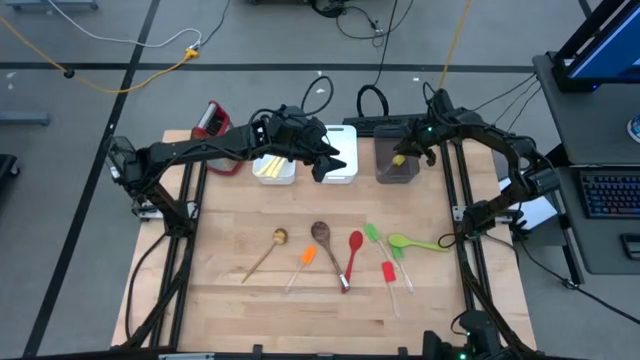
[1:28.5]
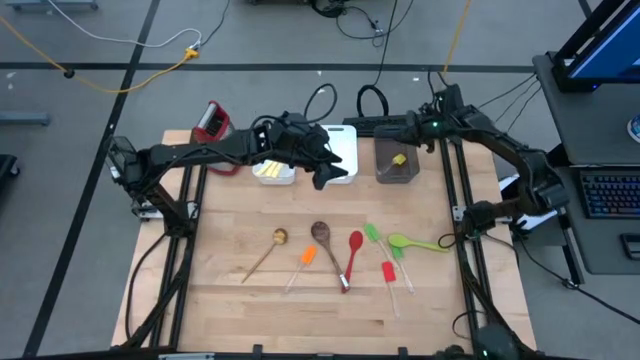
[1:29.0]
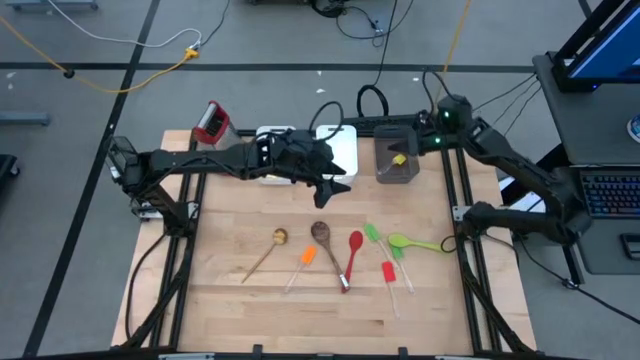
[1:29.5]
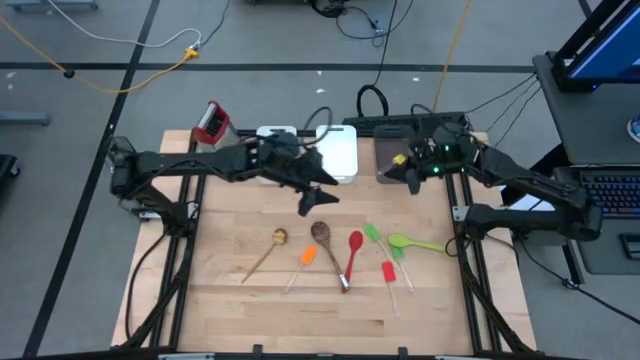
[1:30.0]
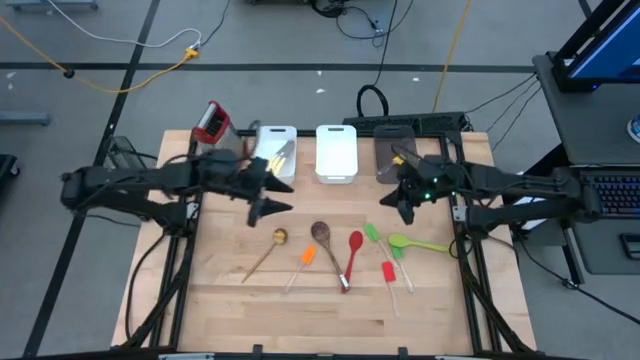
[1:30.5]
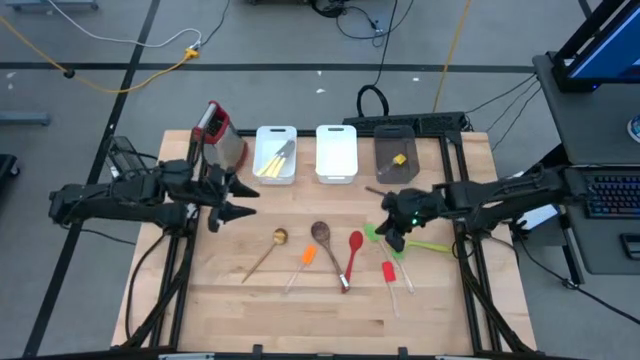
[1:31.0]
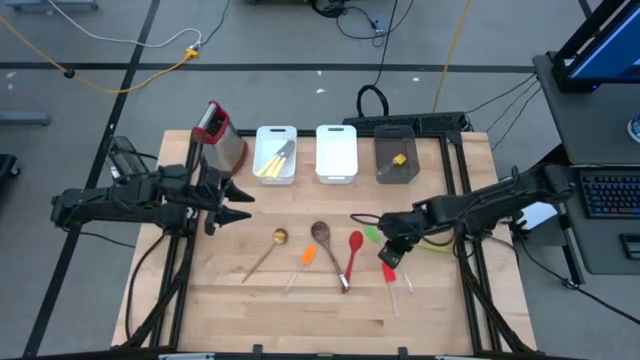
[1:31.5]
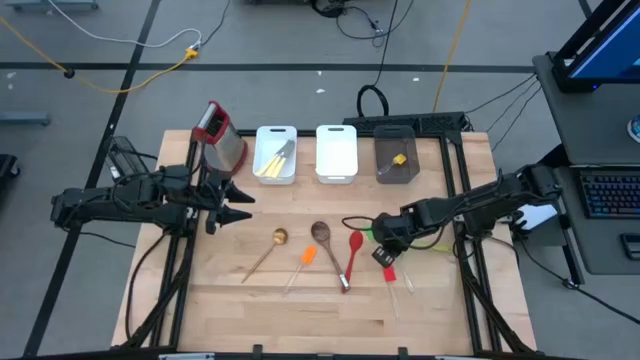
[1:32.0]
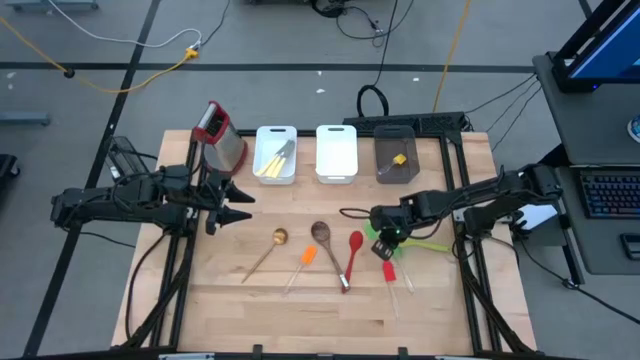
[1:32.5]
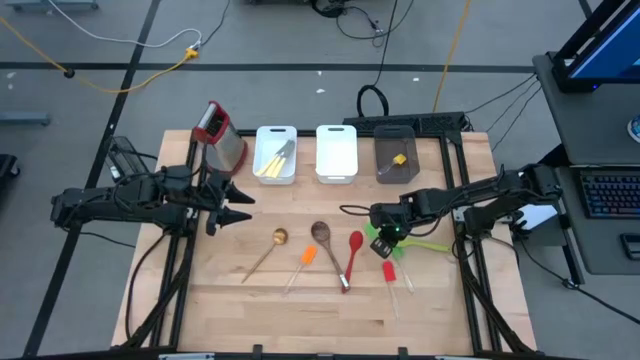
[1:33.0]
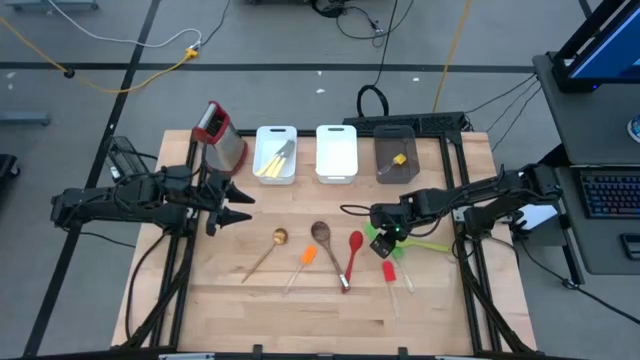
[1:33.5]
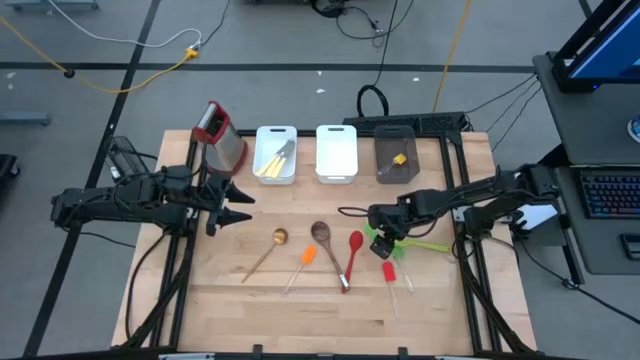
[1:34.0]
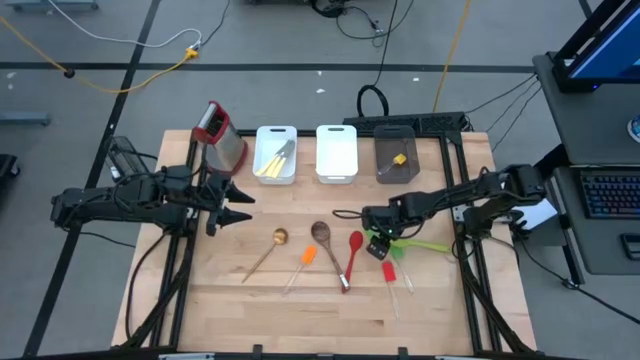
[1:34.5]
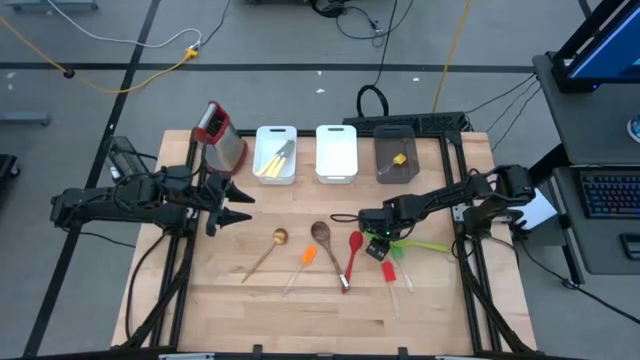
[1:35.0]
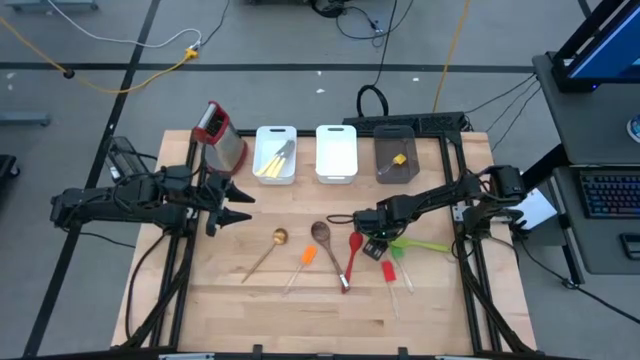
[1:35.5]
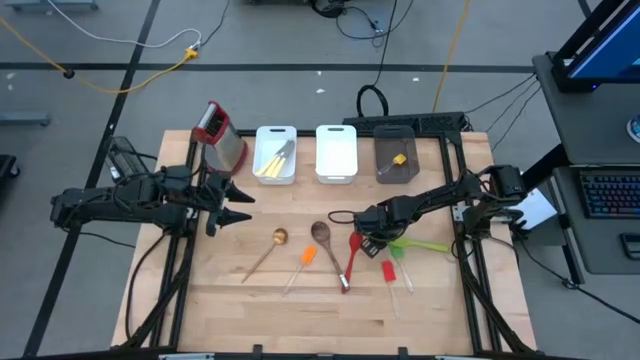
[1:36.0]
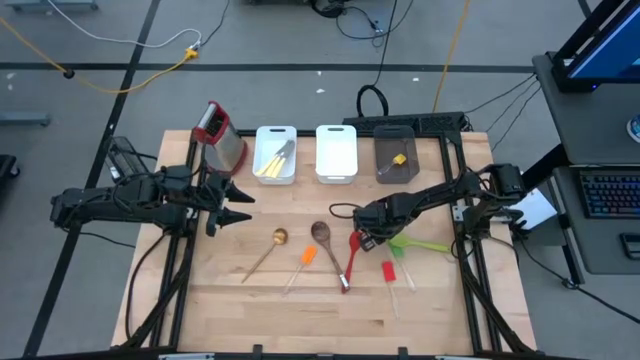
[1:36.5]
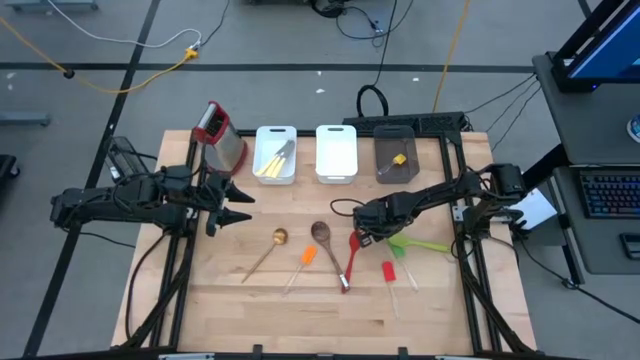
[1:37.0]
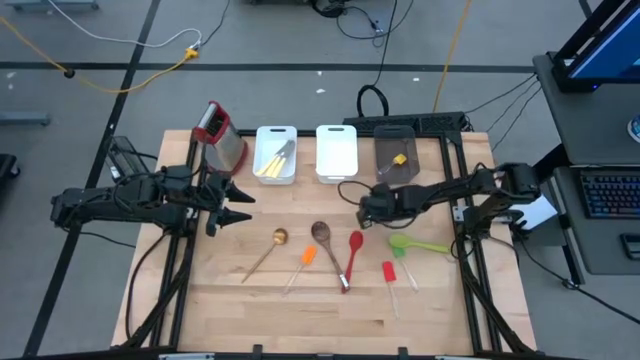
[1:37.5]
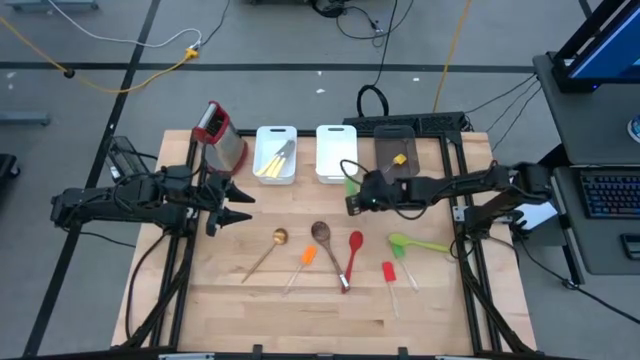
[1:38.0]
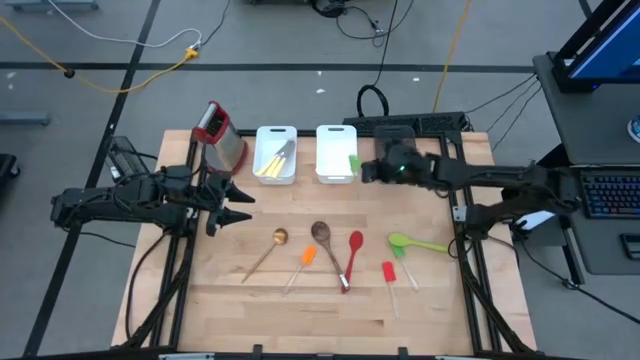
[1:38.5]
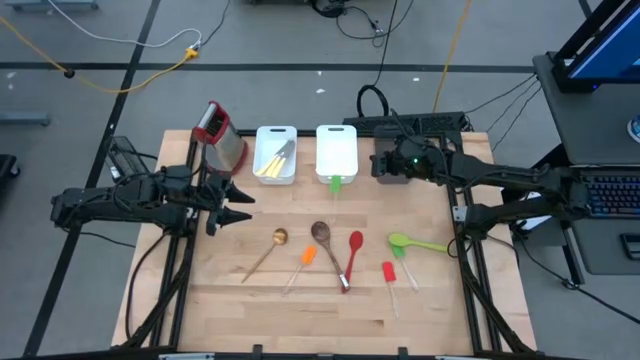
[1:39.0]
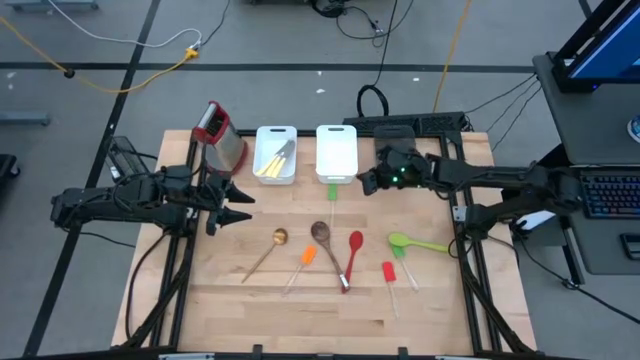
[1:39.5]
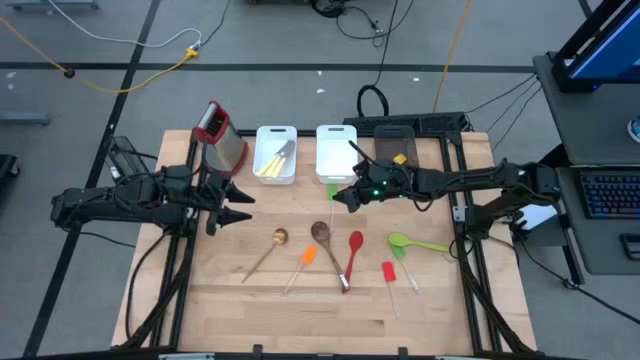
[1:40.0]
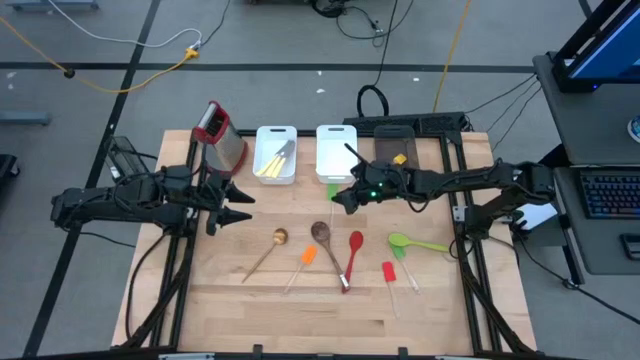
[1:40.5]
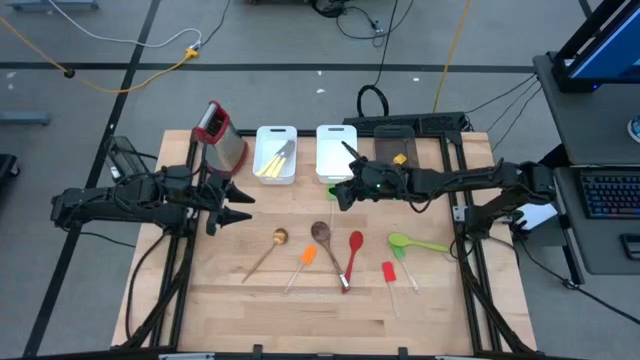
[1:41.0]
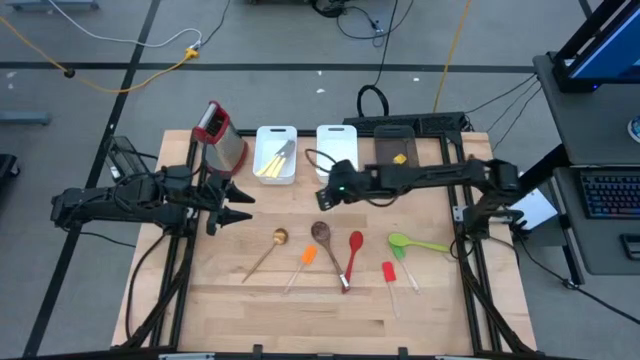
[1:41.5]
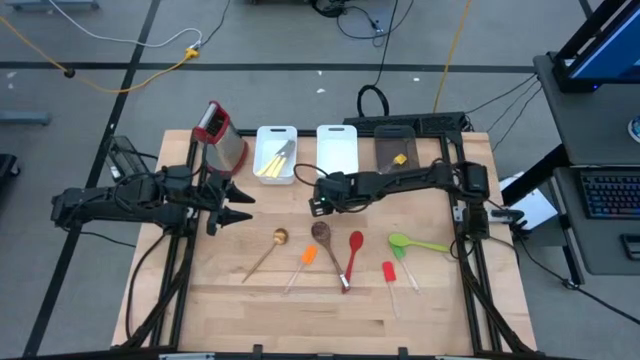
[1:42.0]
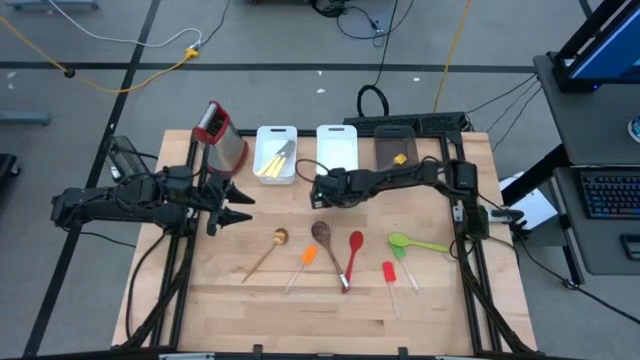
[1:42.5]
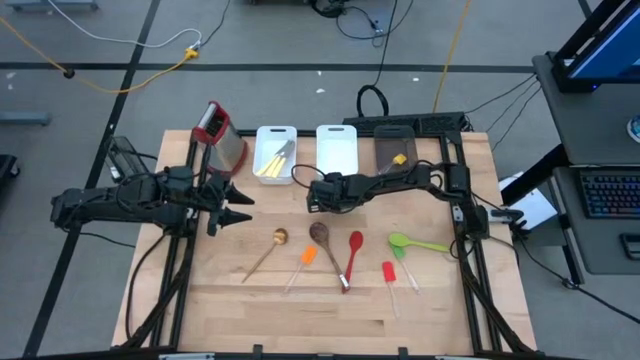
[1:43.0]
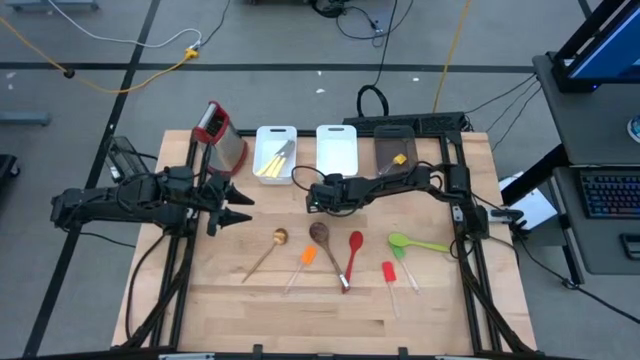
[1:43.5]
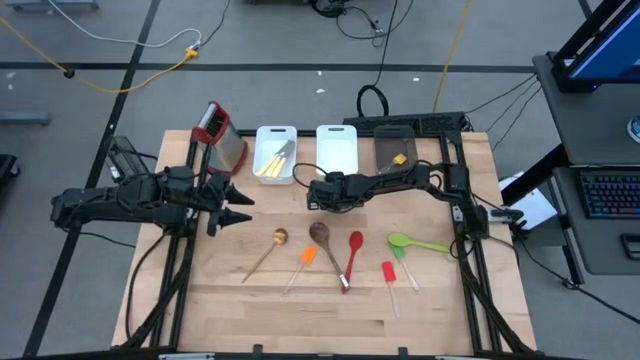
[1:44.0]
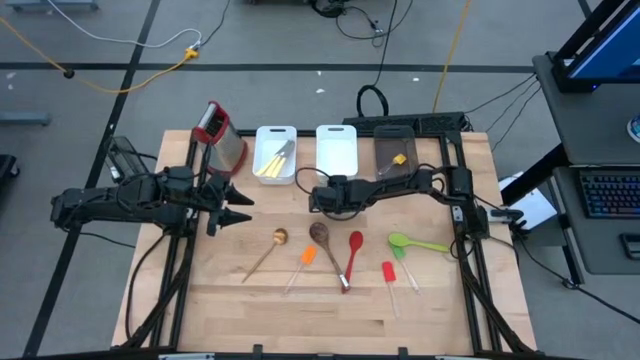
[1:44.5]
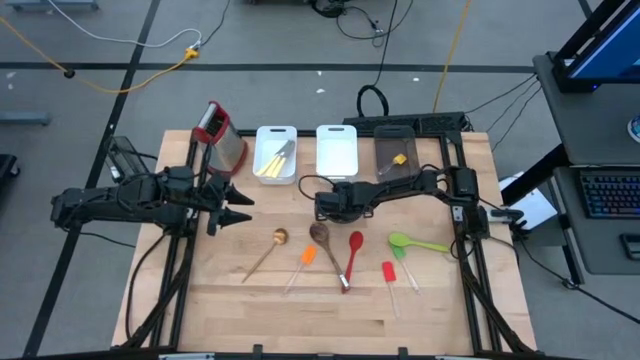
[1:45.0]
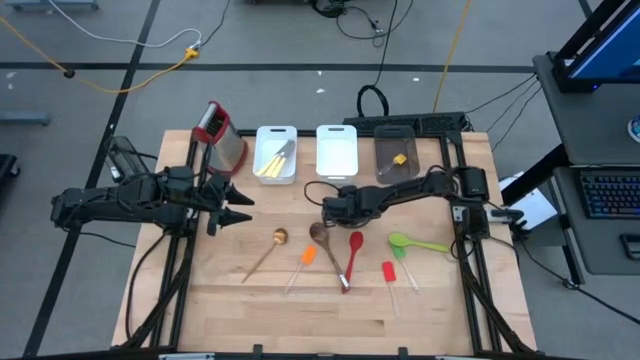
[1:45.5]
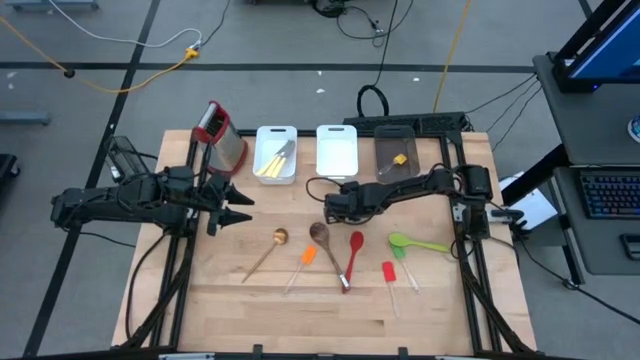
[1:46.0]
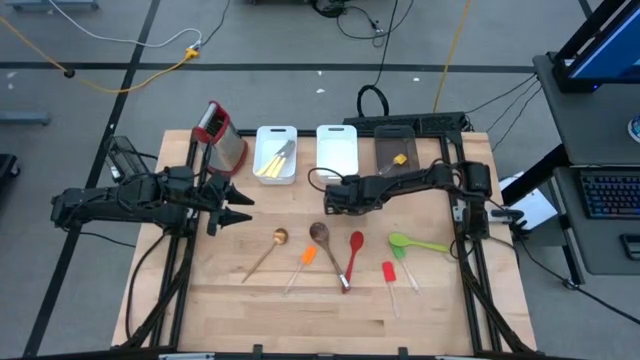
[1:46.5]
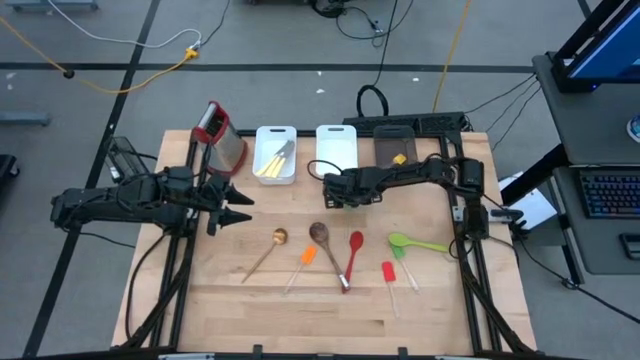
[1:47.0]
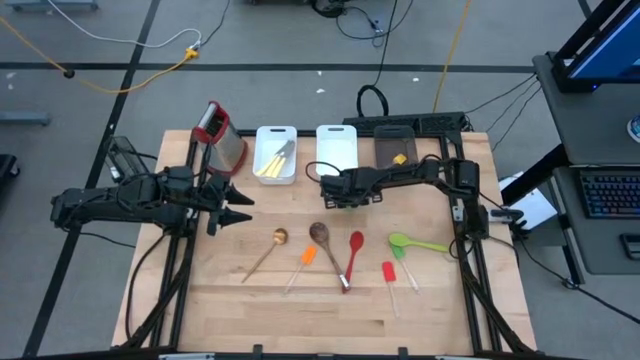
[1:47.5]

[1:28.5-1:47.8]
Task: Pick & Place Kitchen Items
Put the top green spatula into the black bin

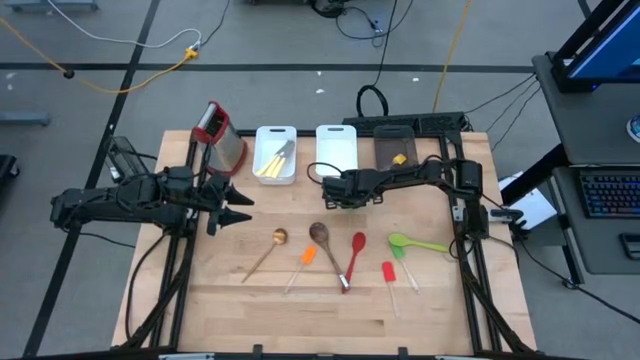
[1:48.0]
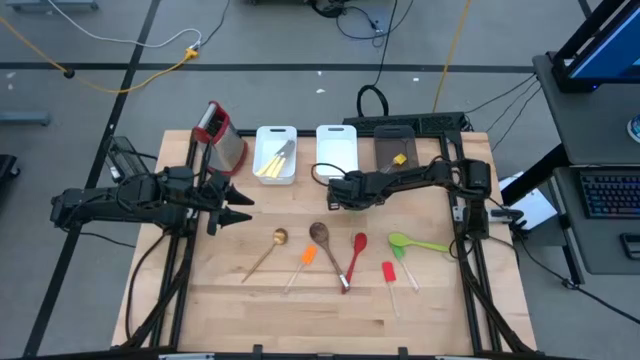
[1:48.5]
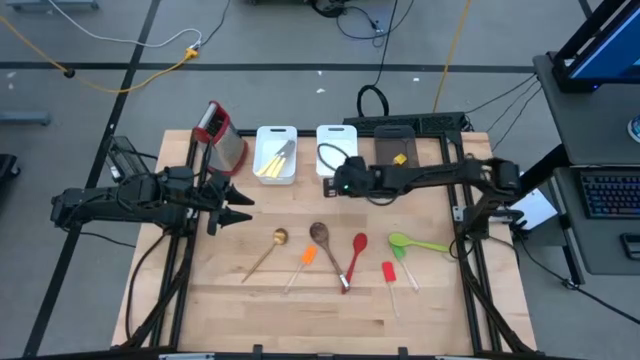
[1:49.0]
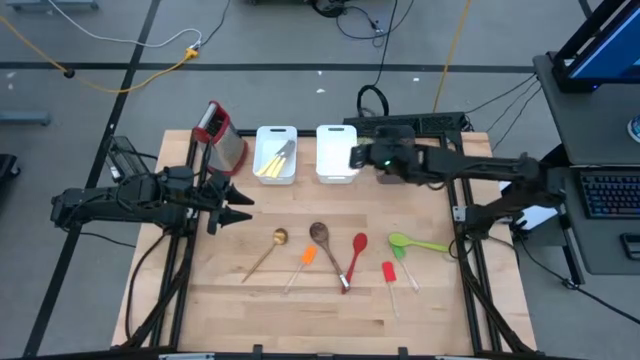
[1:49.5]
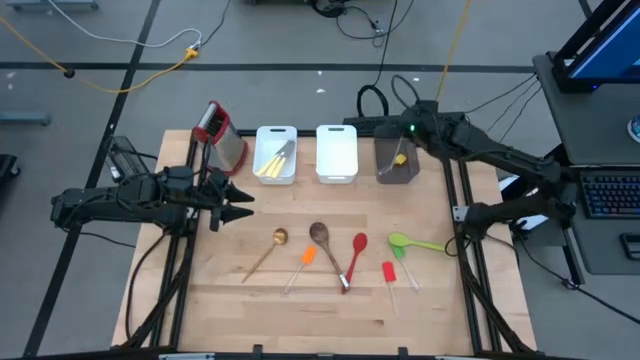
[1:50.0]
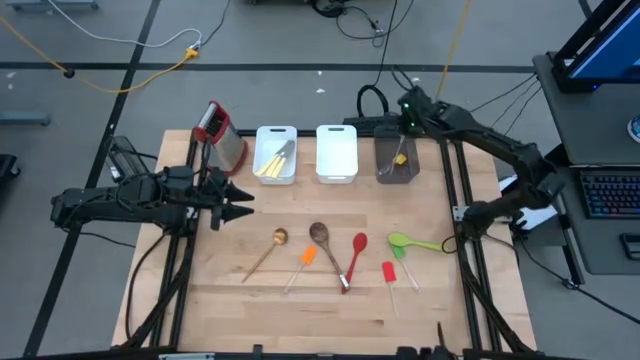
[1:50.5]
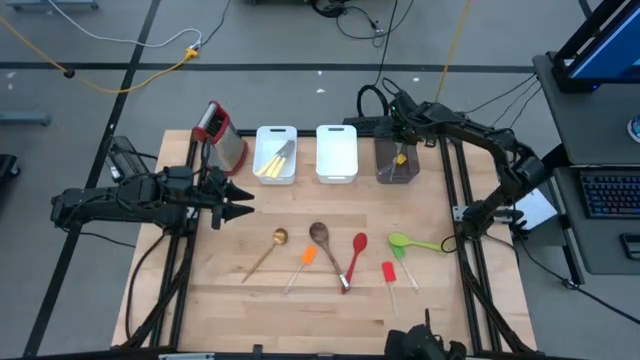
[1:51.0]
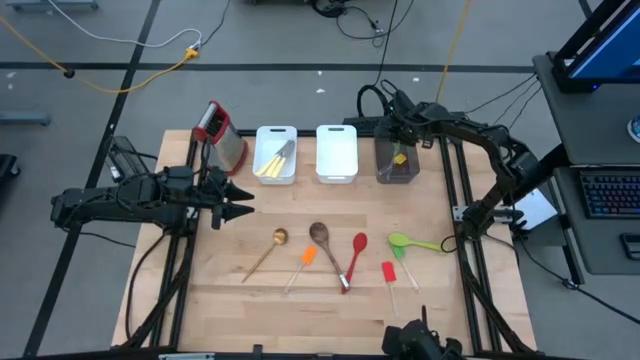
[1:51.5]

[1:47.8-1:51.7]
Put the top green spatula into the black bin
